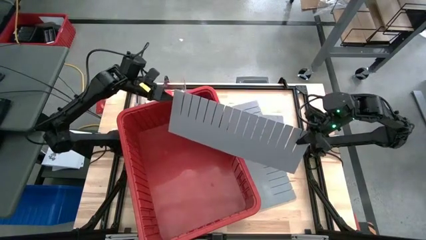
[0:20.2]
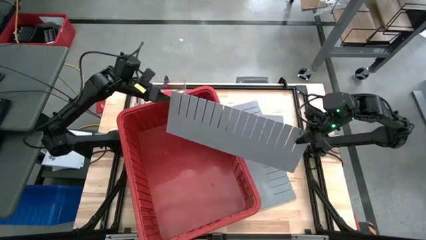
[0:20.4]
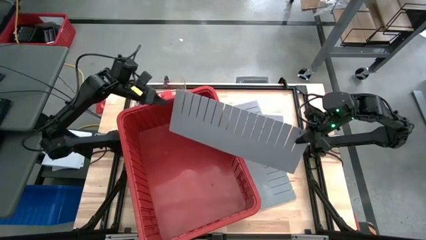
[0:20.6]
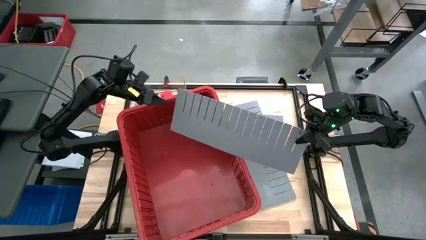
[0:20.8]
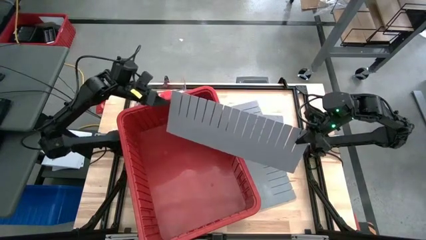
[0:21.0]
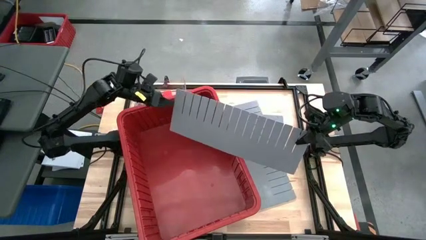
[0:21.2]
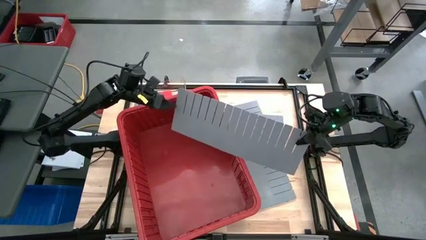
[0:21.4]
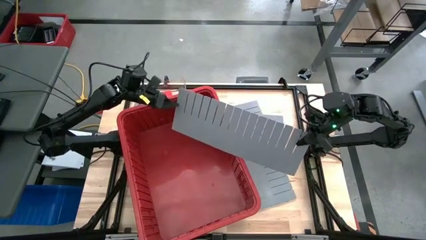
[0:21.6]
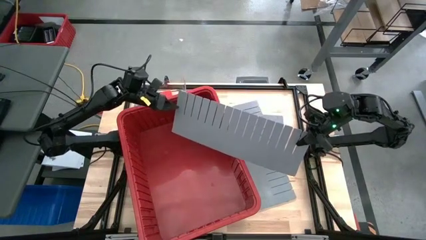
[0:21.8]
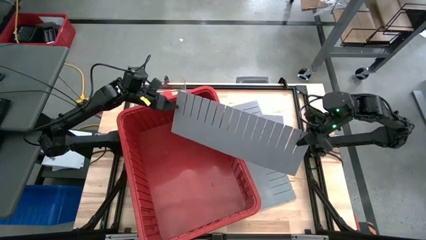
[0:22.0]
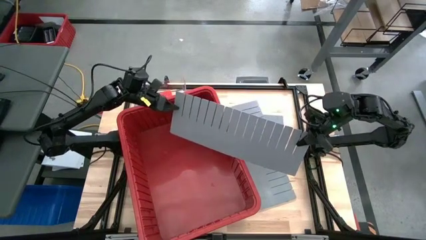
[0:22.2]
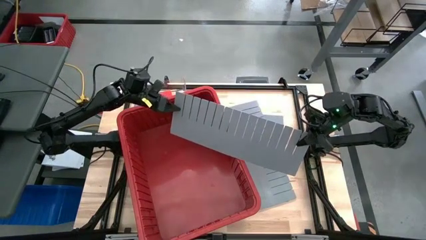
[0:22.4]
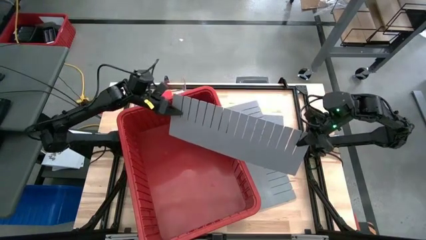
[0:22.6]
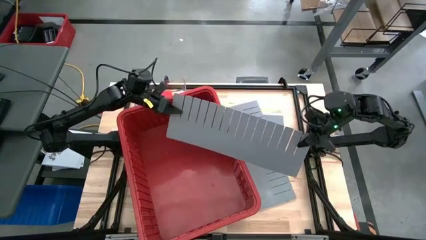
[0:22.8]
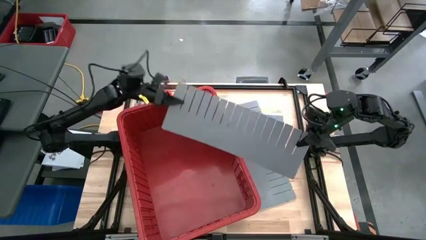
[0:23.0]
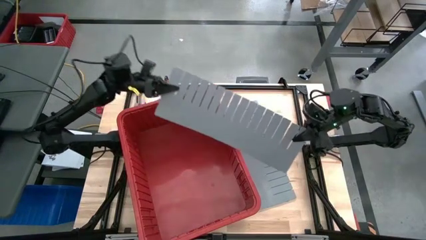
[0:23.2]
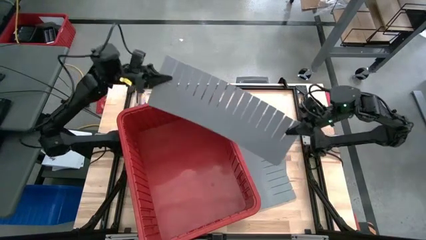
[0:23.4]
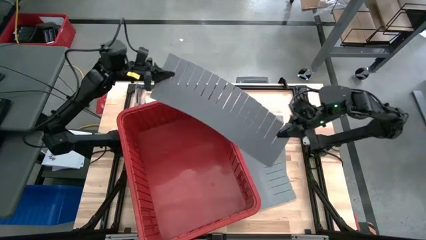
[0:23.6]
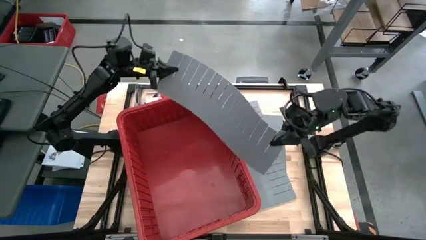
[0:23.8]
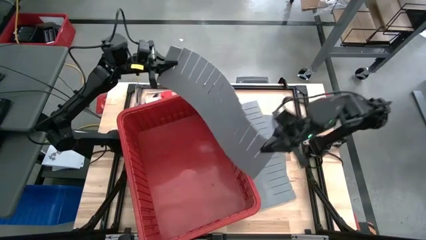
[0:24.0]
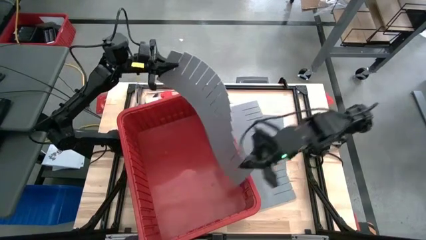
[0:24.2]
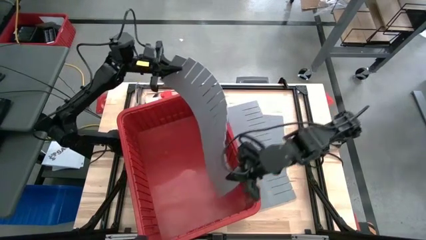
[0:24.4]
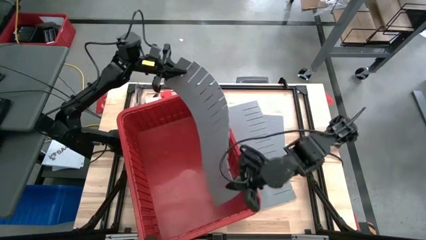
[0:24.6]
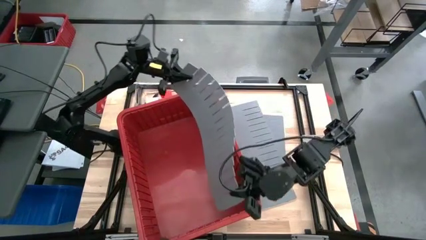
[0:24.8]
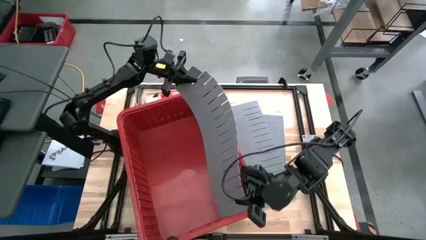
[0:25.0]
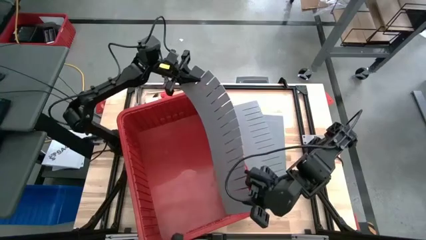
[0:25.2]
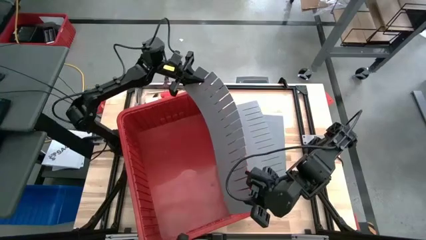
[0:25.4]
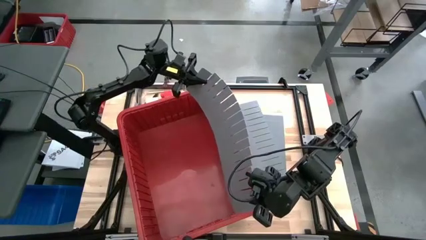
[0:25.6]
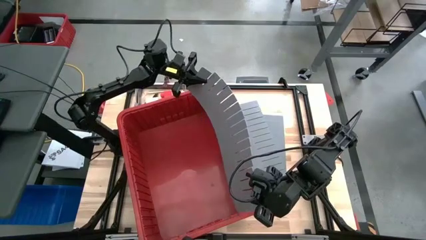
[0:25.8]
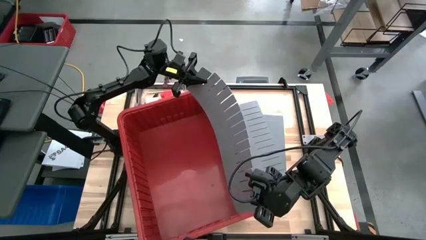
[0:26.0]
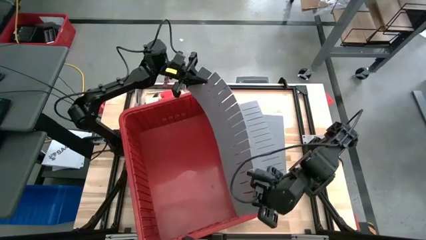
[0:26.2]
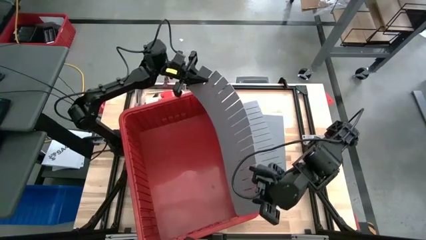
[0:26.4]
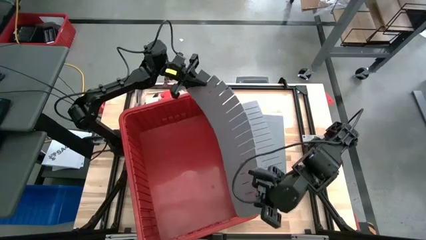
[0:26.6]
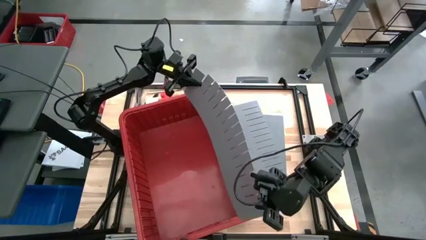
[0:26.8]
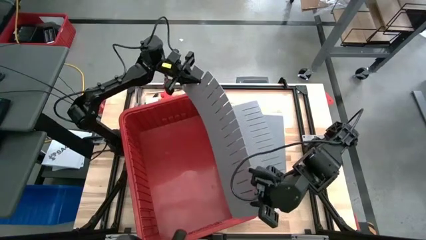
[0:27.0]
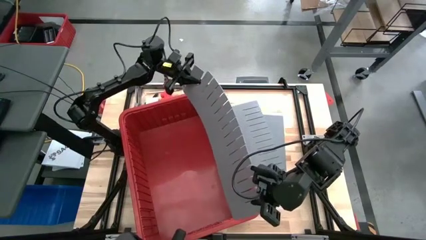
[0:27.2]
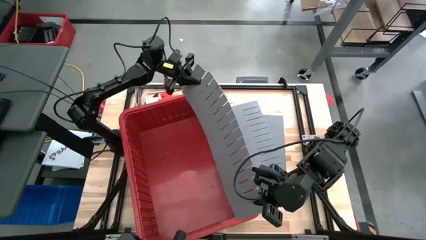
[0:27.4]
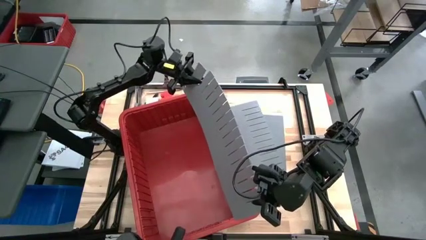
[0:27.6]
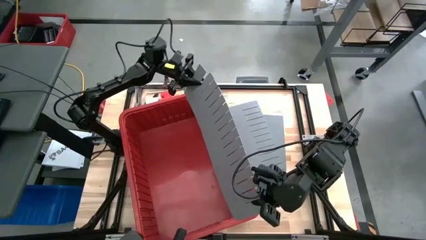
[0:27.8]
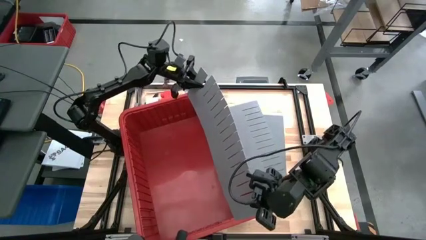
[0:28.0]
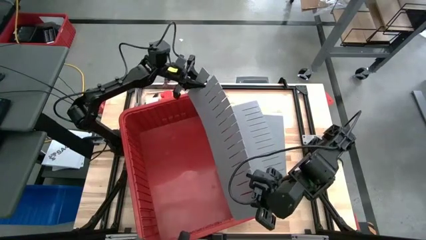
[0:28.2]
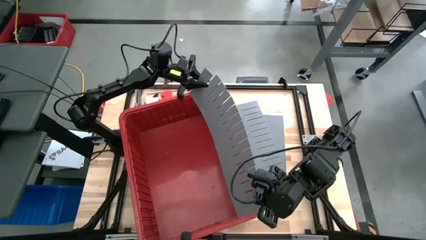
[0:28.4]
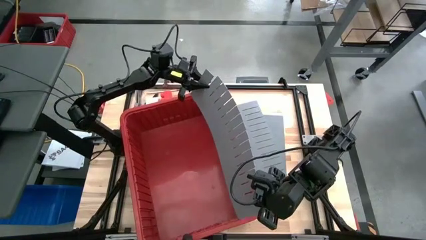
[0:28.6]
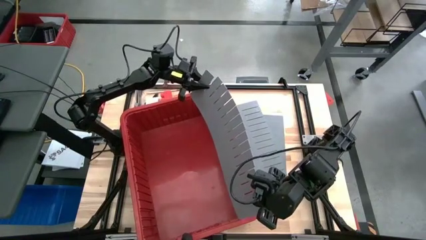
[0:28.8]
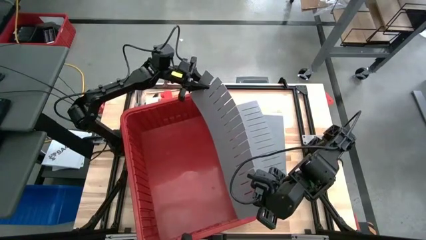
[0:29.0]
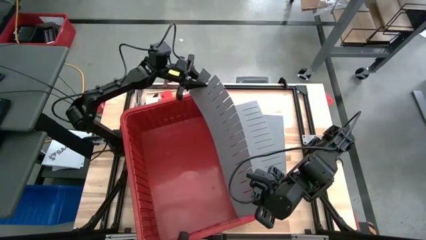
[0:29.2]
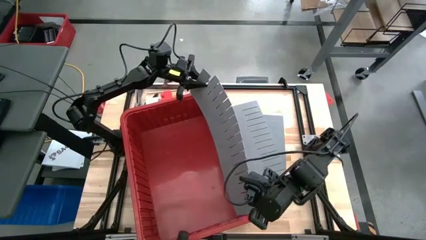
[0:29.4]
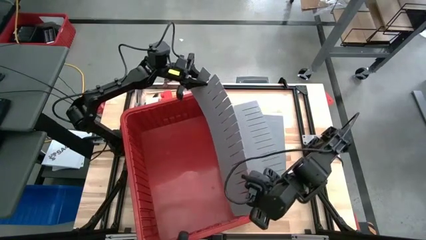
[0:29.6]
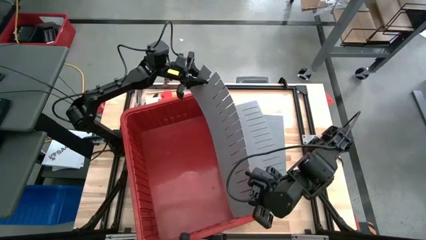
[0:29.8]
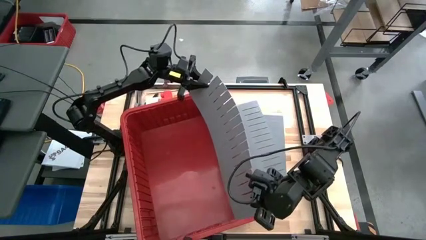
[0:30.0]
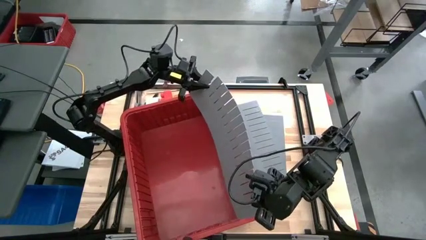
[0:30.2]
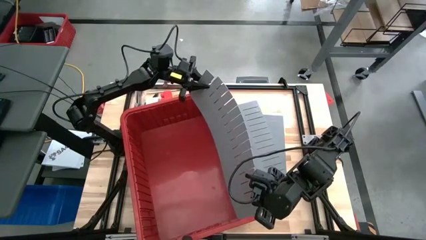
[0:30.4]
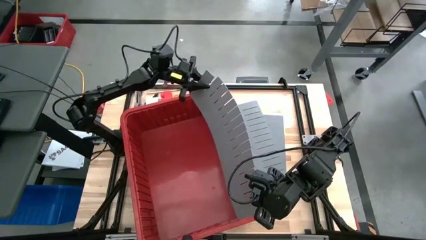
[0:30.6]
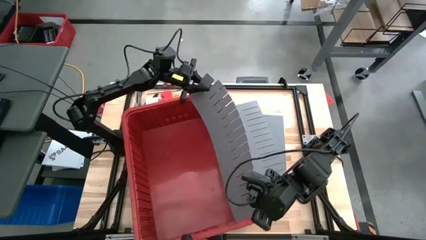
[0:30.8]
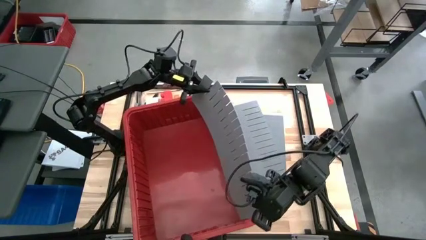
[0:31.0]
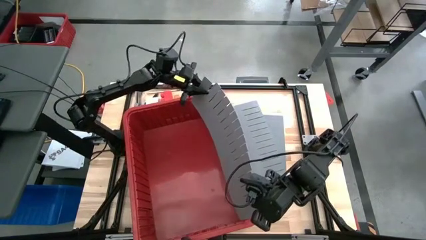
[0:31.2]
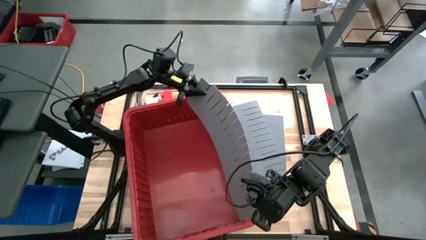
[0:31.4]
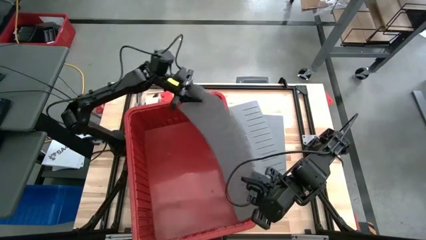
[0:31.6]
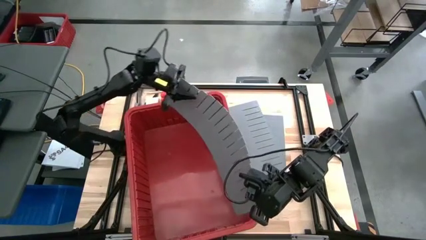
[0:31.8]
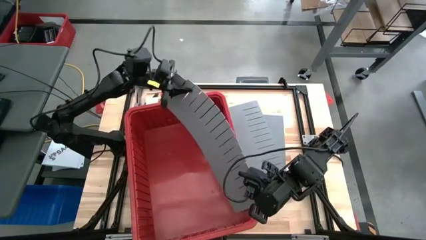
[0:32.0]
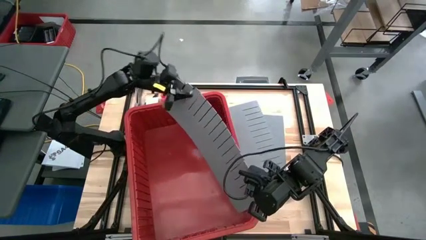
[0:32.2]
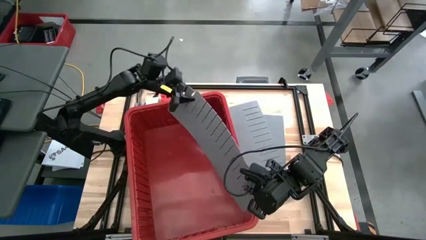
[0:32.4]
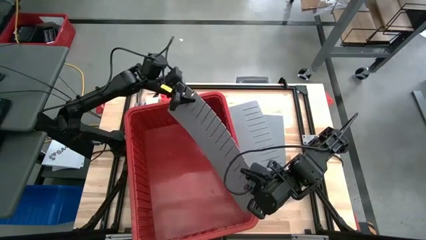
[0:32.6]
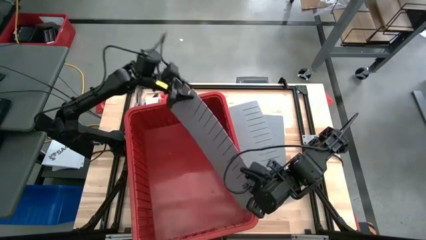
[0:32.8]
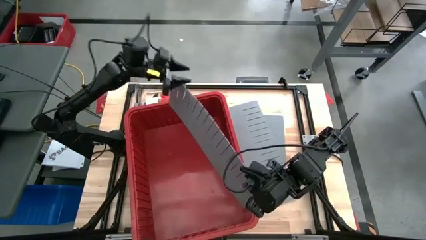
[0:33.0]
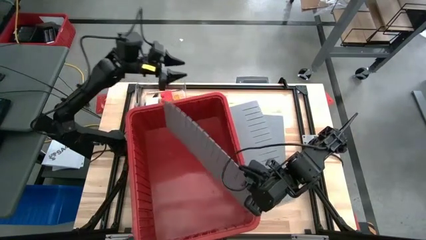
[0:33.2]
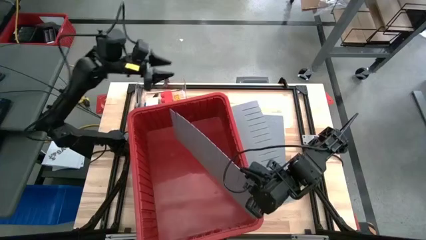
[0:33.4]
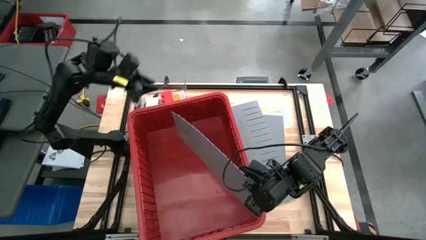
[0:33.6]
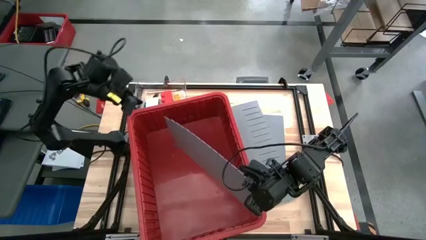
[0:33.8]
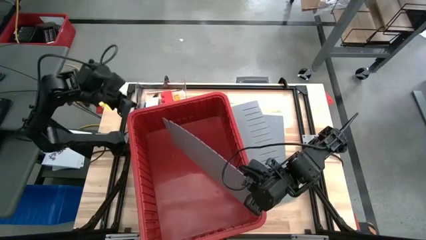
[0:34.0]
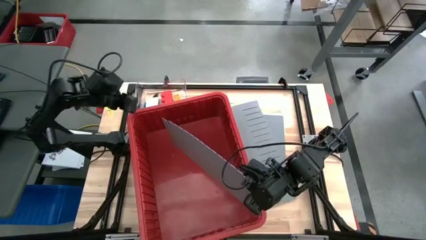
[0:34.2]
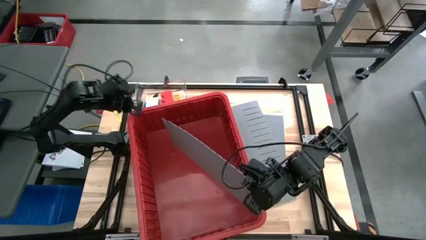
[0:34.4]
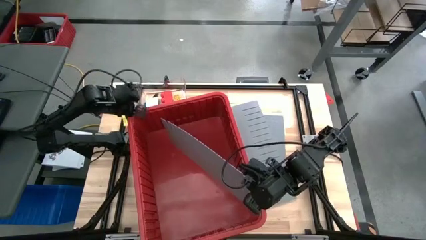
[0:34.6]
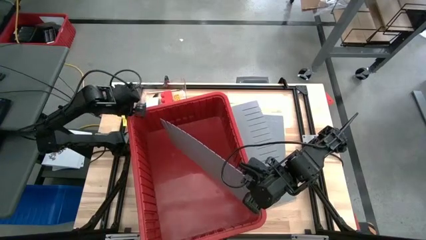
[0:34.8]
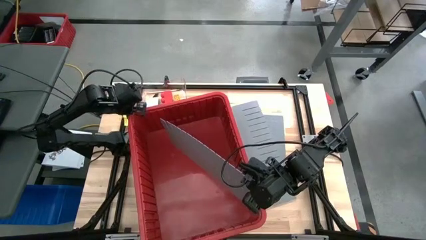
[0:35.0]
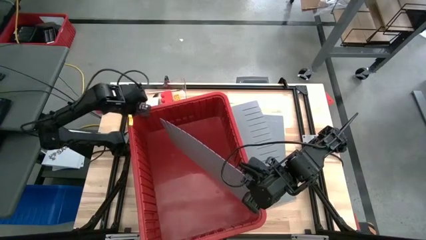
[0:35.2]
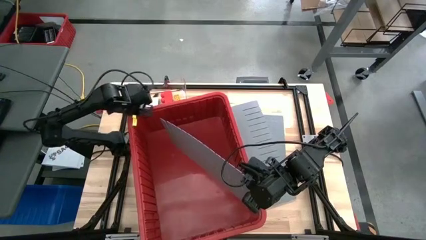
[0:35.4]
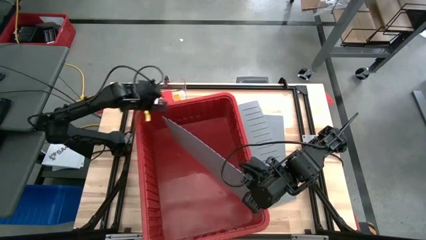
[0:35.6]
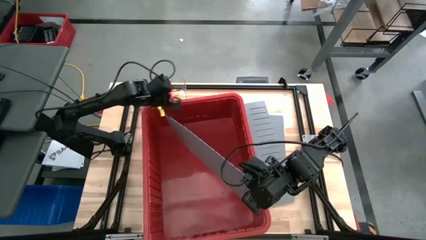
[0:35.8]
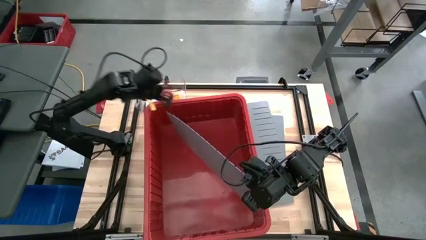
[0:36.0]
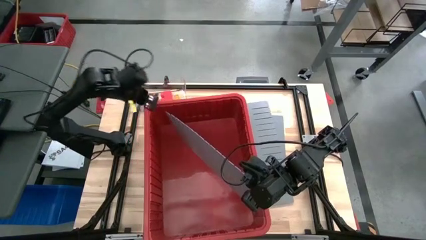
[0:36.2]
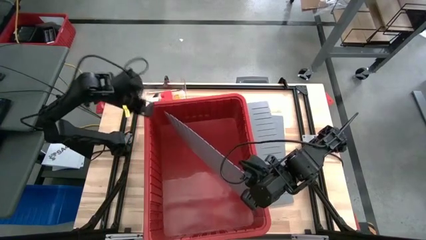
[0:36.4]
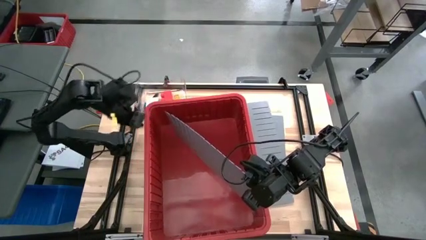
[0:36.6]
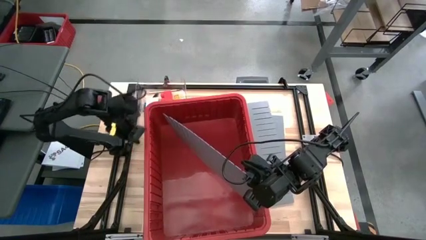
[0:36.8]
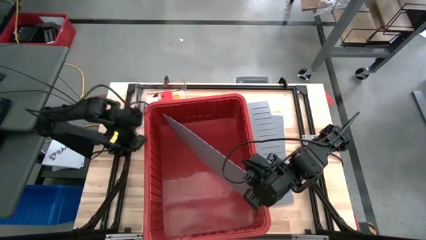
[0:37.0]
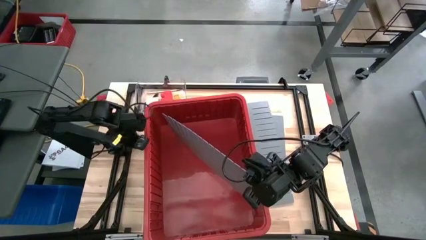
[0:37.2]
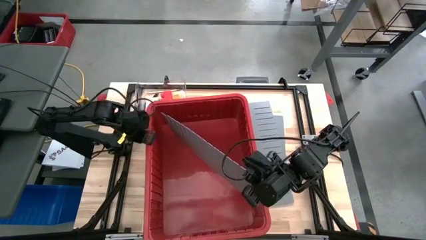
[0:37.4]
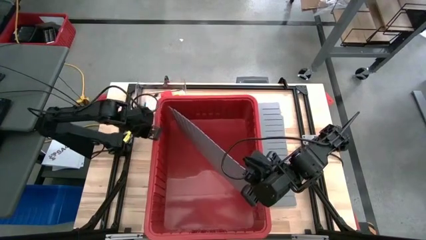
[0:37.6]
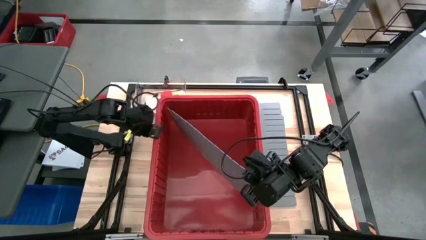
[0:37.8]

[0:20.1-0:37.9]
Task: Sort blocks
Assemble the bin divider into the red bin
